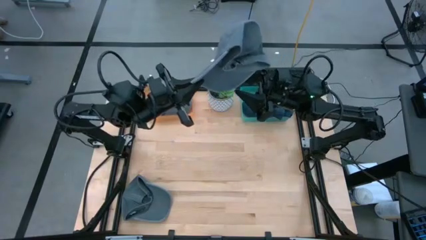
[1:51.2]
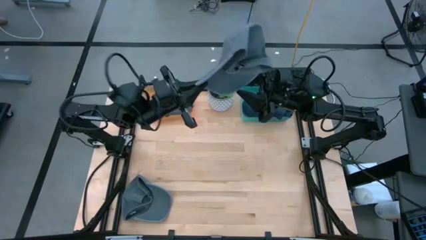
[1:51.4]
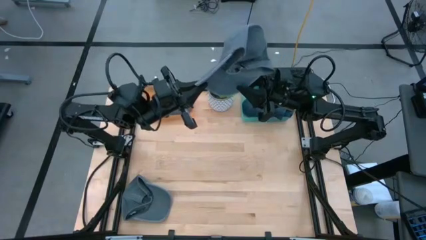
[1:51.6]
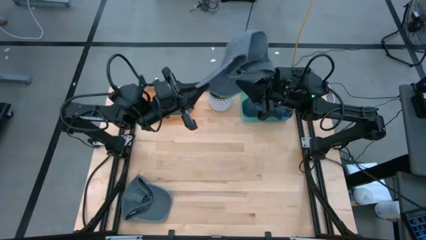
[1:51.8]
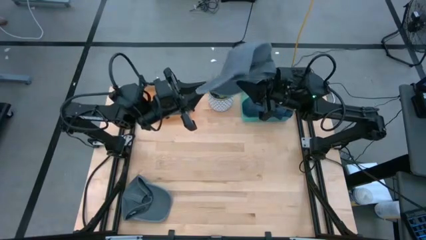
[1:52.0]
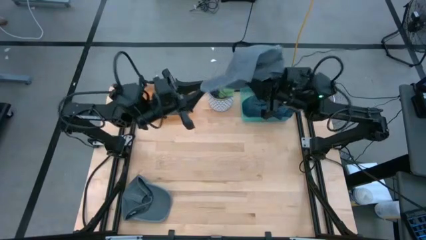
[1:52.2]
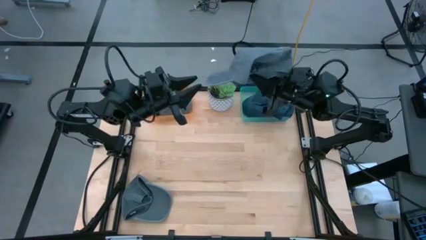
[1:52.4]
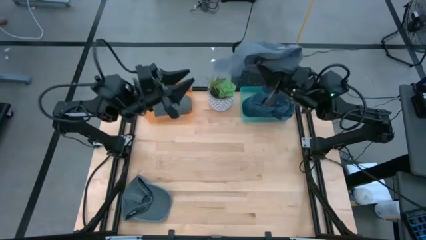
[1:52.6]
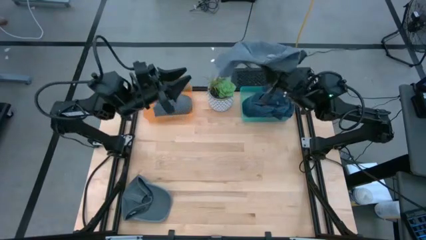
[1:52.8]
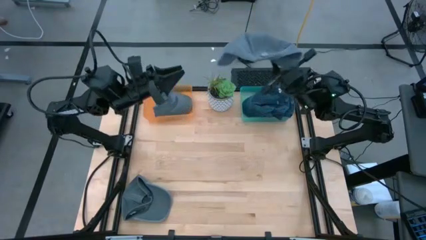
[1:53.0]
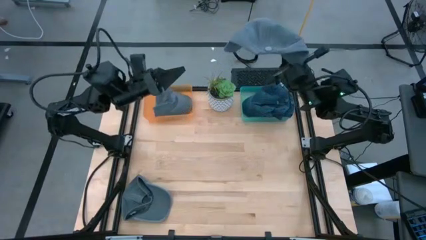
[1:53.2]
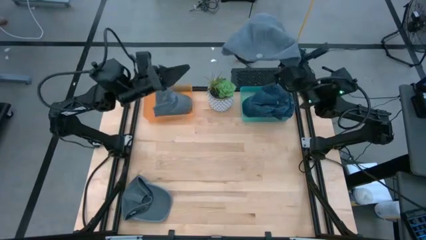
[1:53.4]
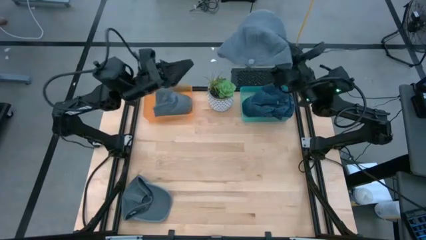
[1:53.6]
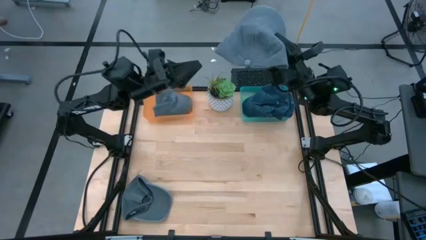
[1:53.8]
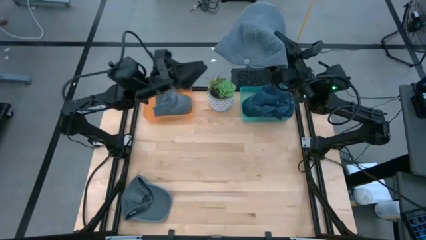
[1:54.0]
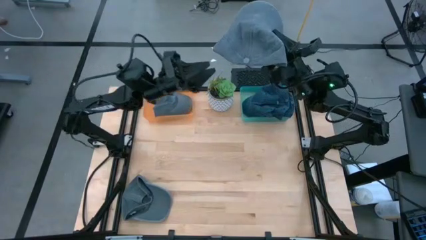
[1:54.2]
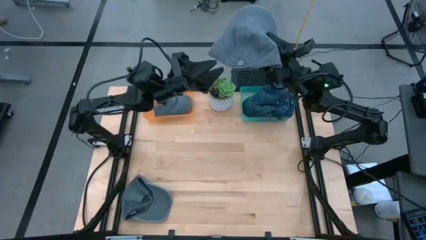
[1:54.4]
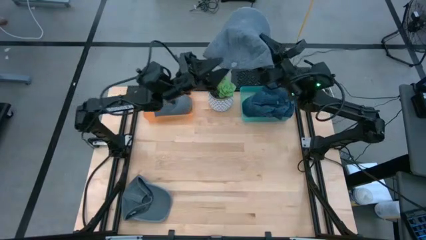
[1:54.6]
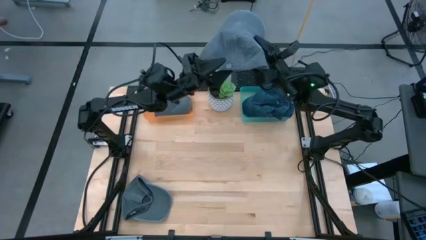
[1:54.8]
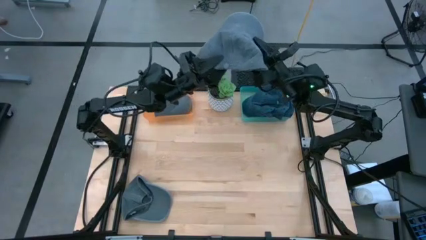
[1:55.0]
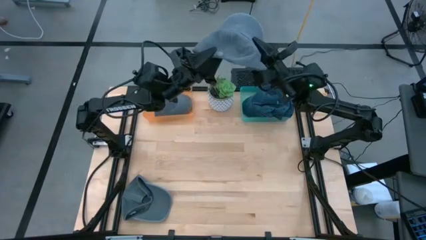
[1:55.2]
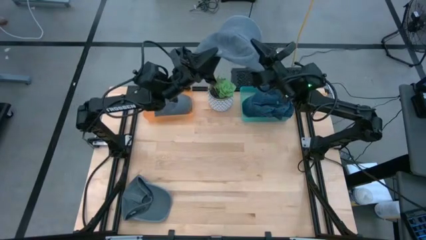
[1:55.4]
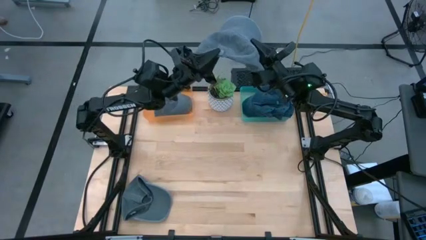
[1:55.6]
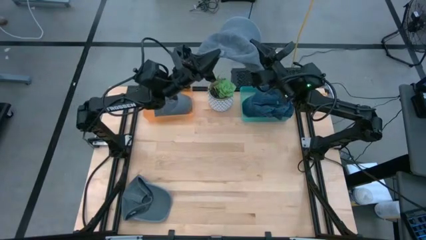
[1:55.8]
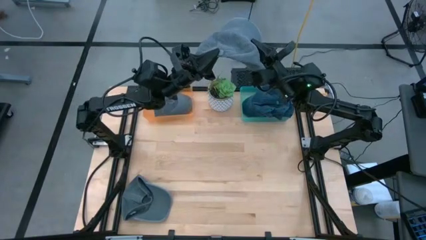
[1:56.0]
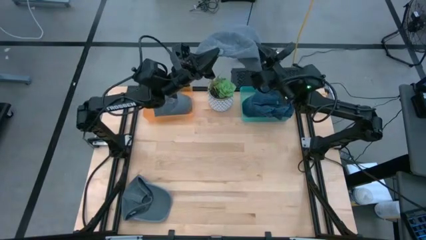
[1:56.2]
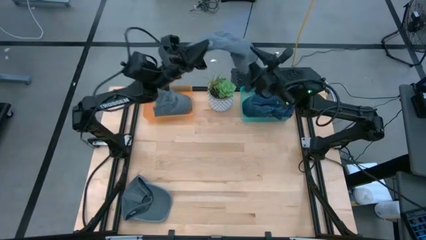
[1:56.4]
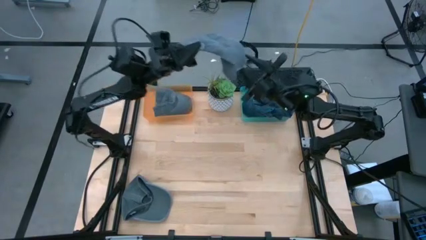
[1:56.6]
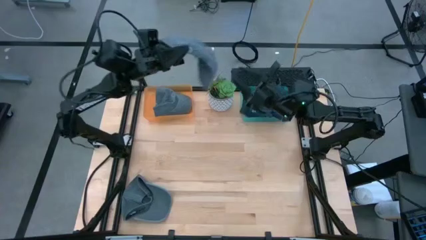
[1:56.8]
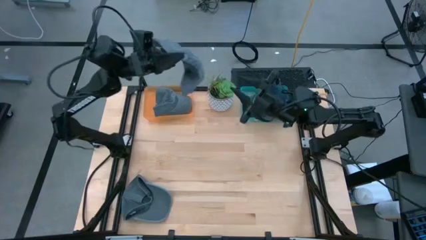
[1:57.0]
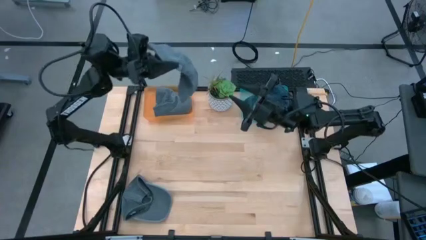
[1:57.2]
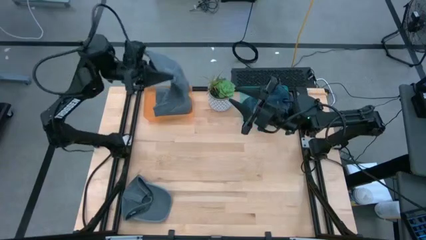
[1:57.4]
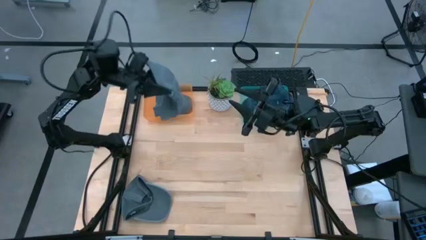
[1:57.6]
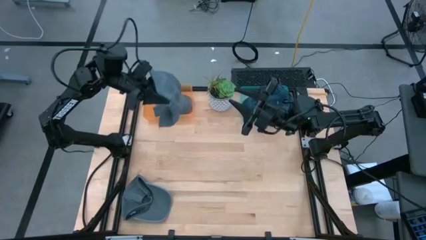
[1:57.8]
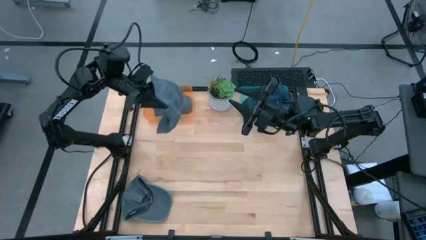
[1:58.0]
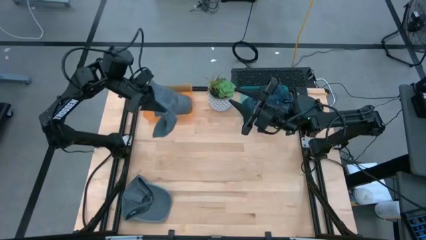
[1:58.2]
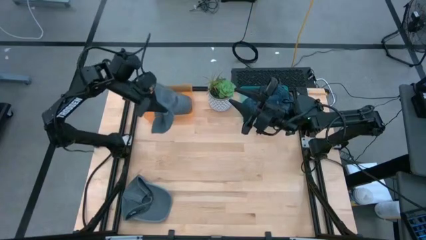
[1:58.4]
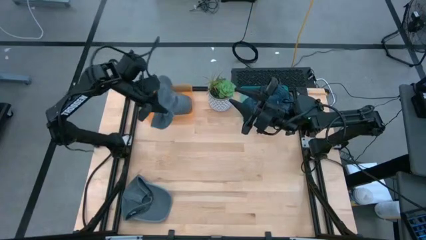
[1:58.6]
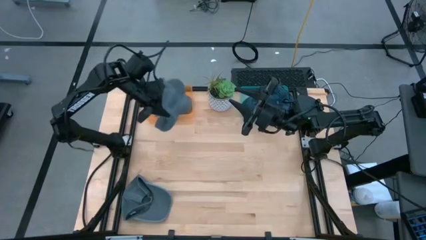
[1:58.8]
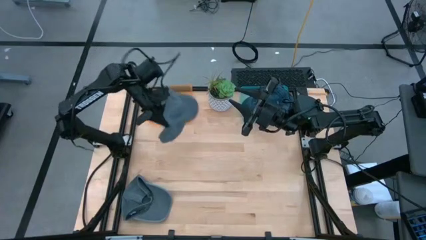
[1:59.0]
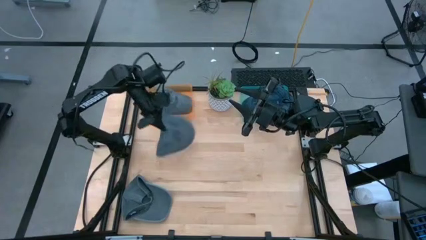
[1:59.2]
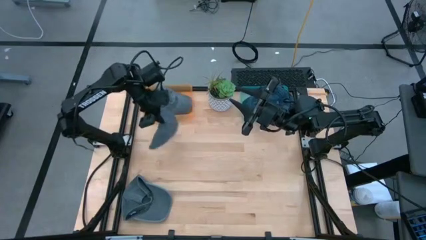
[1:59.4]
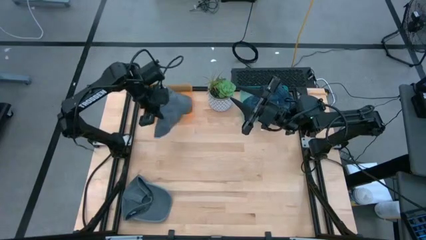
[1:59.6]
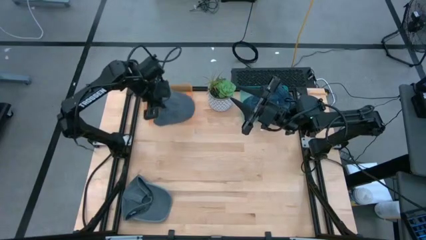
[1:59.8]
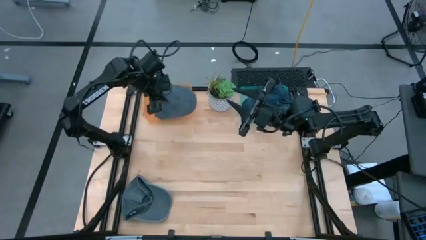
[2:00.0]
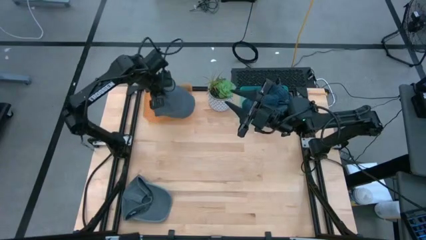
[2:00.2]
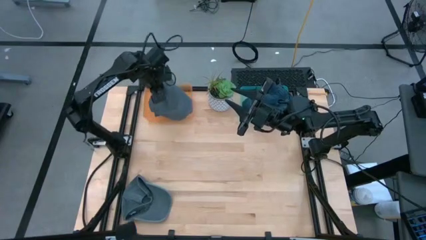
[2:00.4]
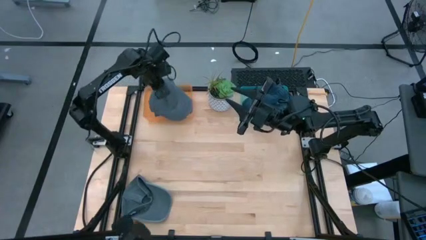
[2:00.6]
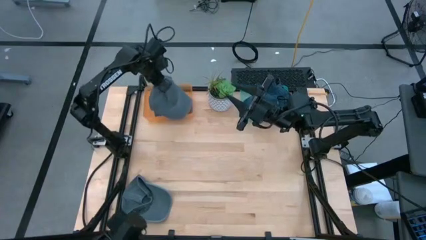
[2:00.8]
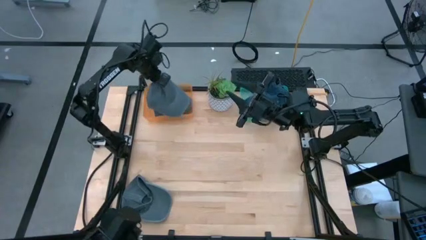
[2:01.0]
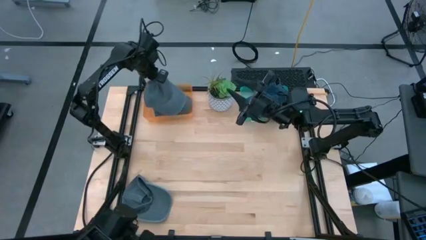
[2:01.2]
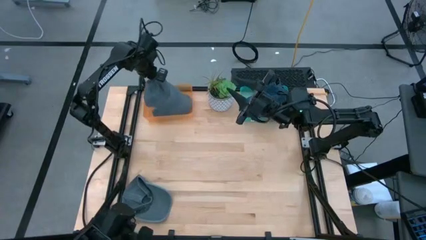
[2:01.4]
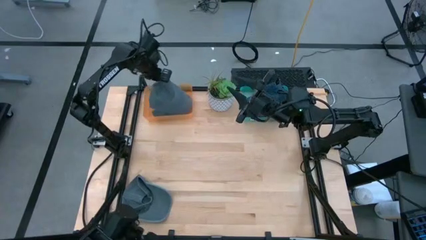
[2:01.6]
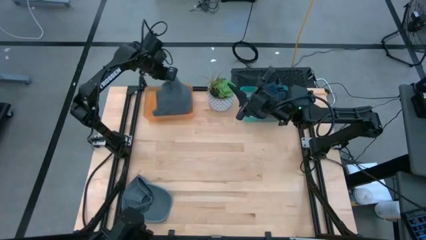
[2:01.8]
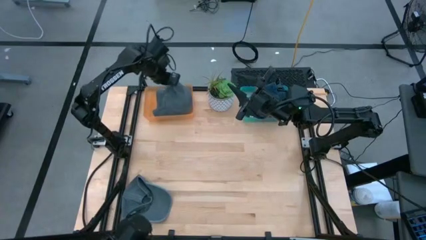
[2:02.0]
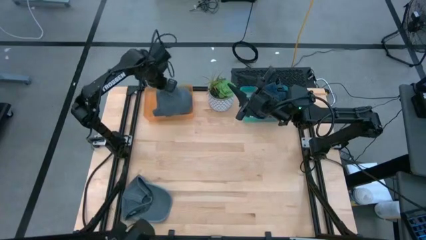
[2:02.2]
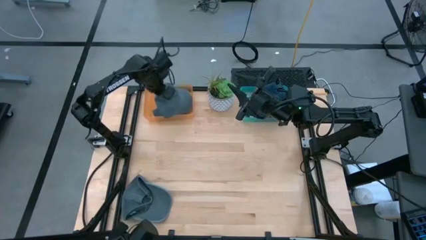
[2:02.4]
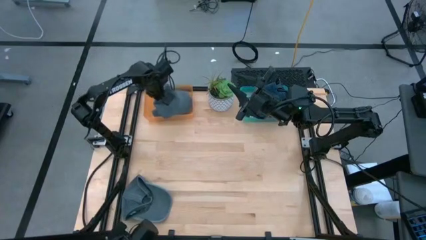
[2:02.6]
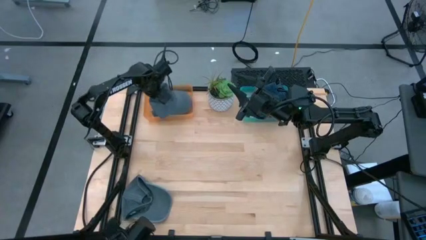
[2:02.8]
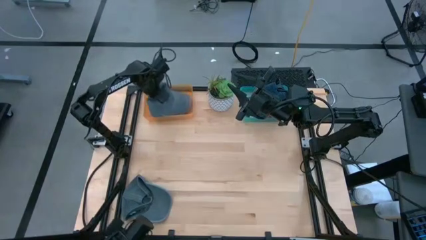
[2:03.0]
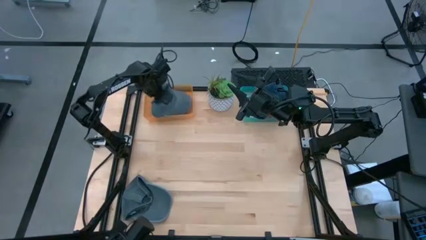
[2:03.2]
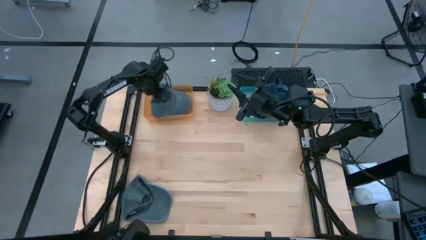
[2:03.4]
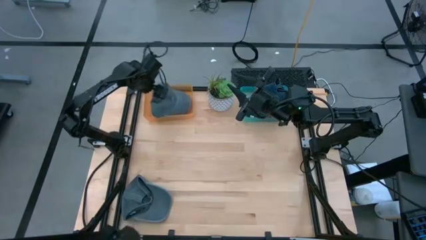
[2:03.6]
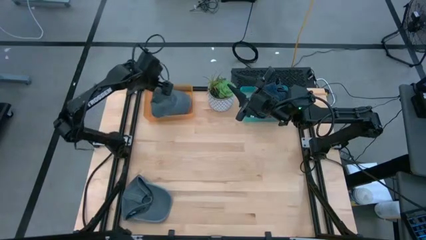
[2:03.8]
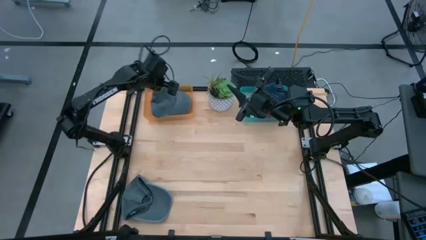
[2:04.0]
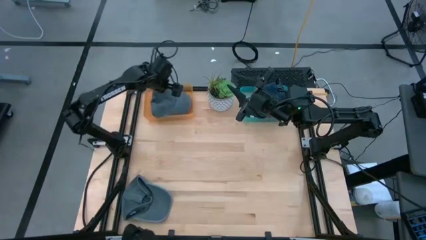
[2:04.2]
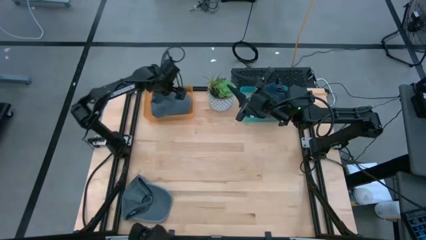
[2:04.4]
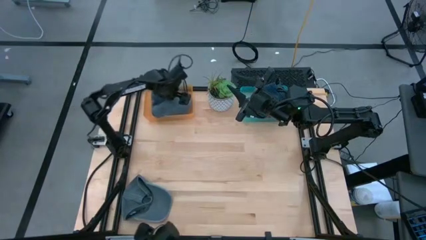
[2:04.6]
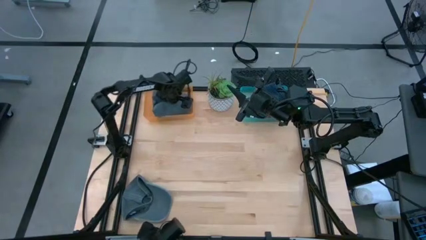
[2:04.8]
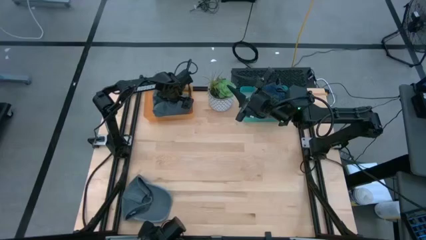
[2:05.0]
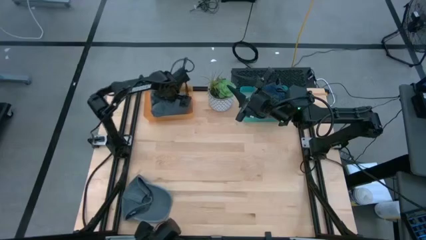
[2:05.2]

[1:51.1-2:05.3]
Task: Pick & Place hat
Put the top gray cap into the orange bin
